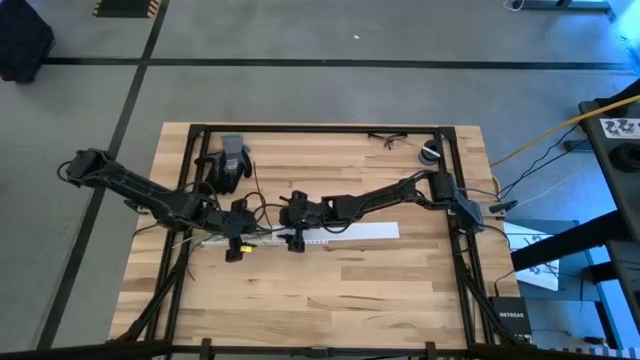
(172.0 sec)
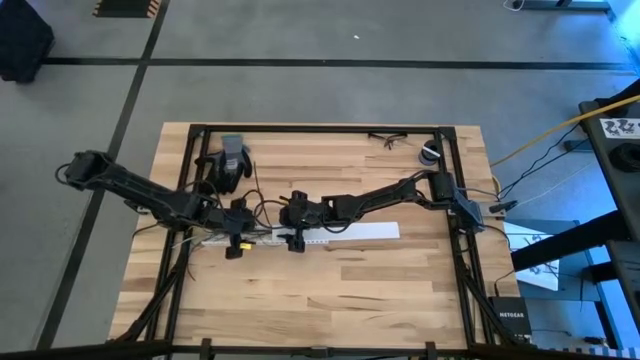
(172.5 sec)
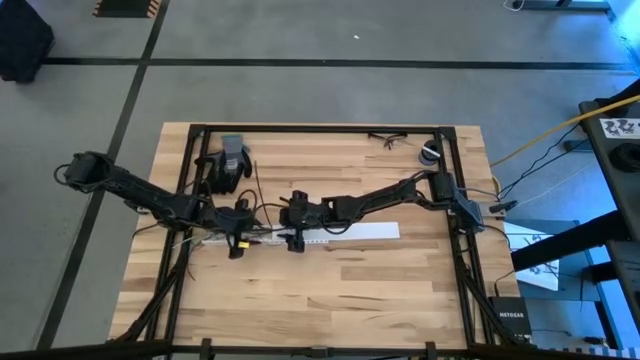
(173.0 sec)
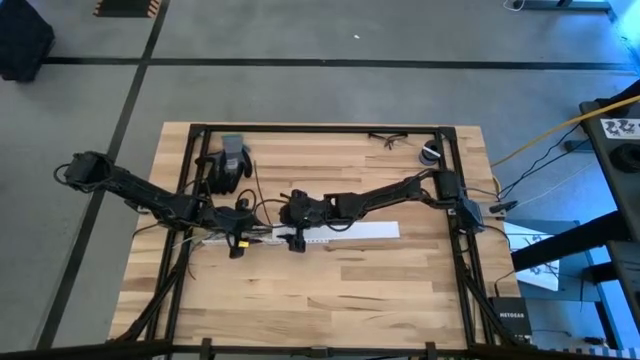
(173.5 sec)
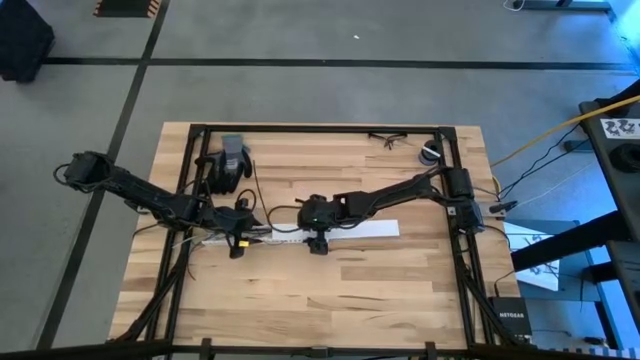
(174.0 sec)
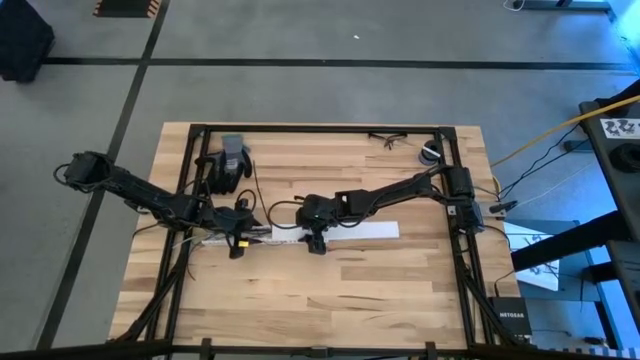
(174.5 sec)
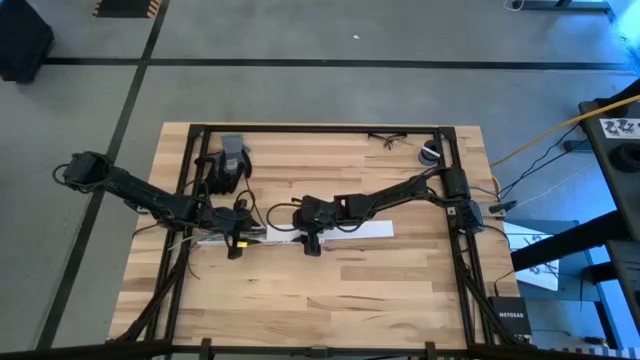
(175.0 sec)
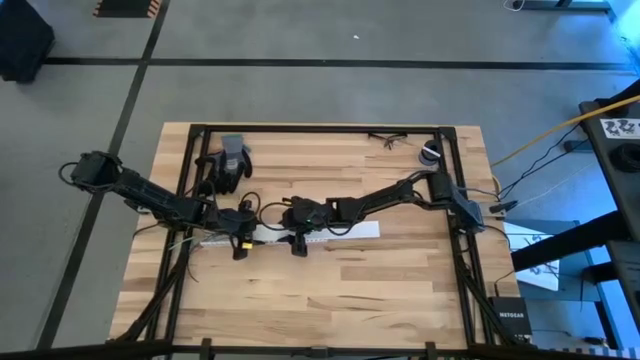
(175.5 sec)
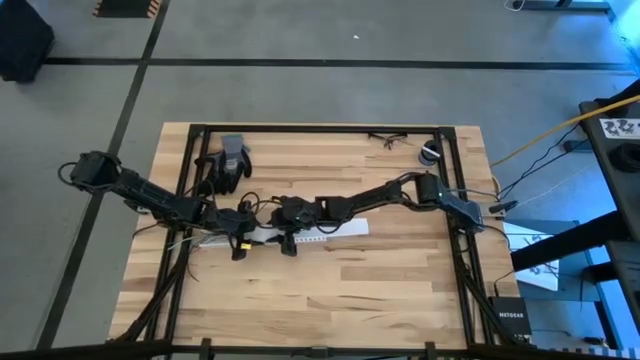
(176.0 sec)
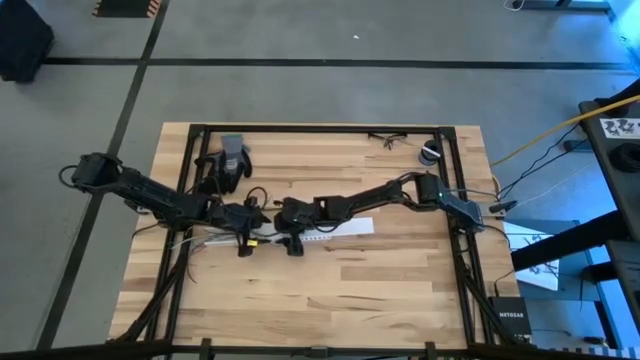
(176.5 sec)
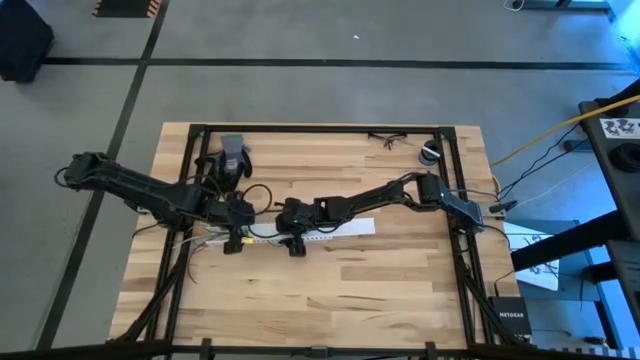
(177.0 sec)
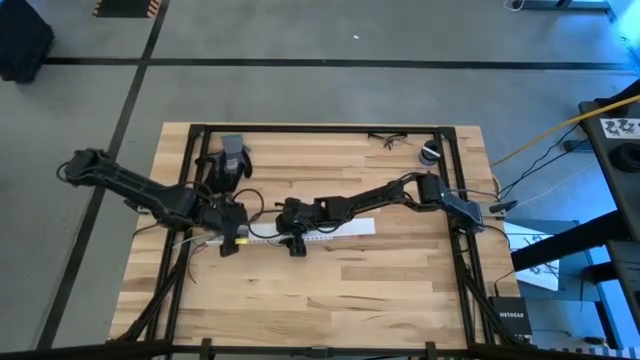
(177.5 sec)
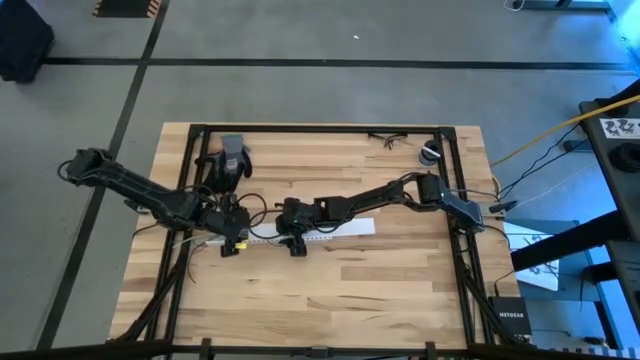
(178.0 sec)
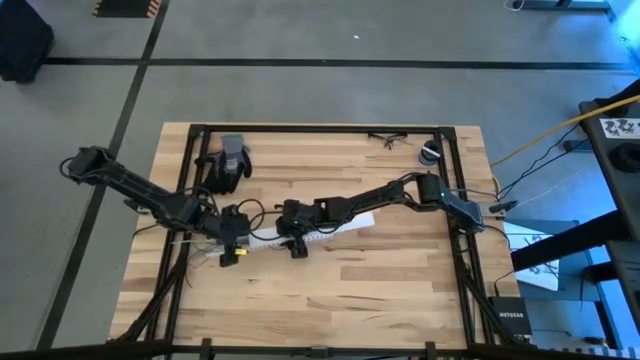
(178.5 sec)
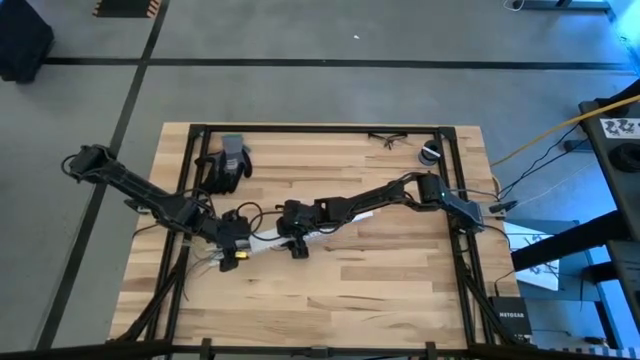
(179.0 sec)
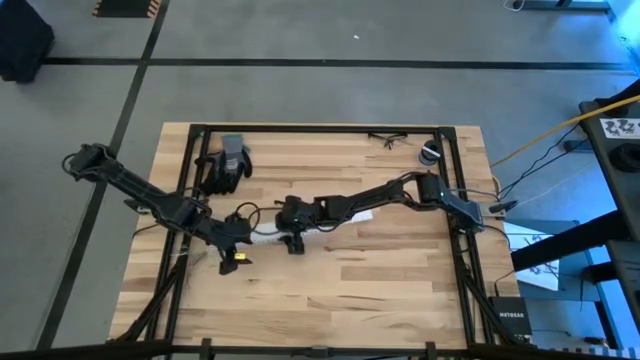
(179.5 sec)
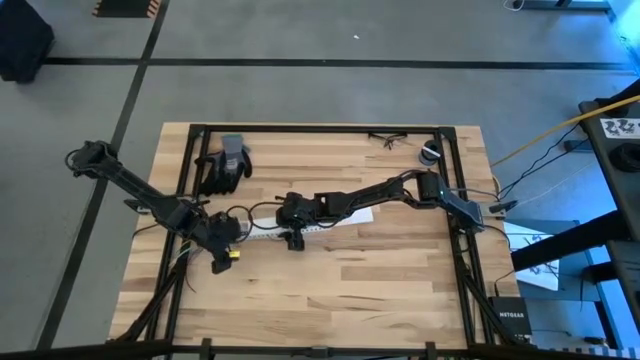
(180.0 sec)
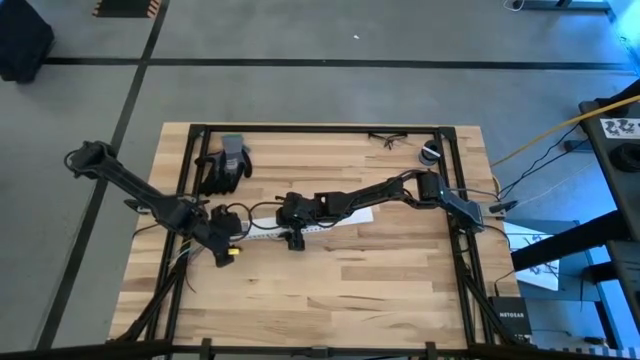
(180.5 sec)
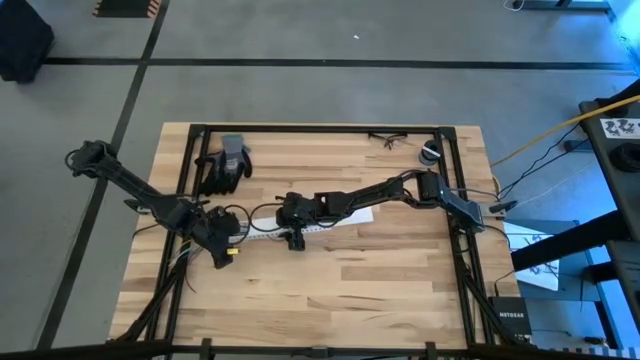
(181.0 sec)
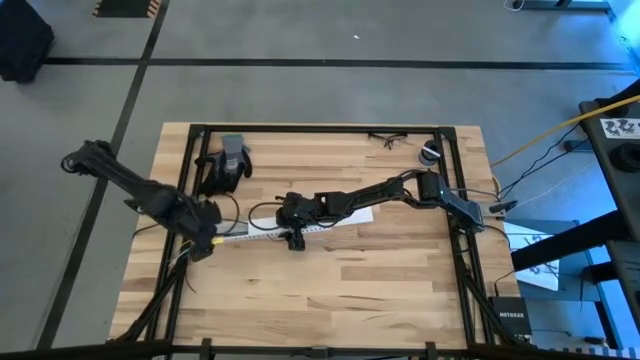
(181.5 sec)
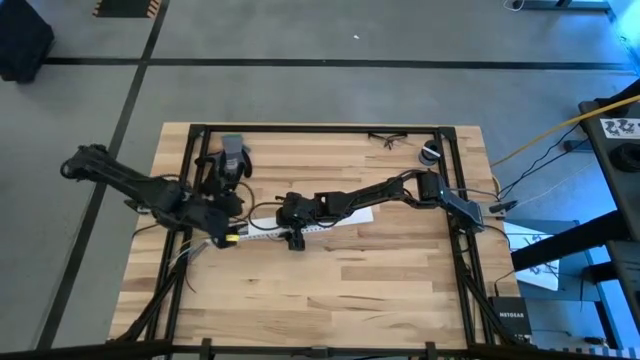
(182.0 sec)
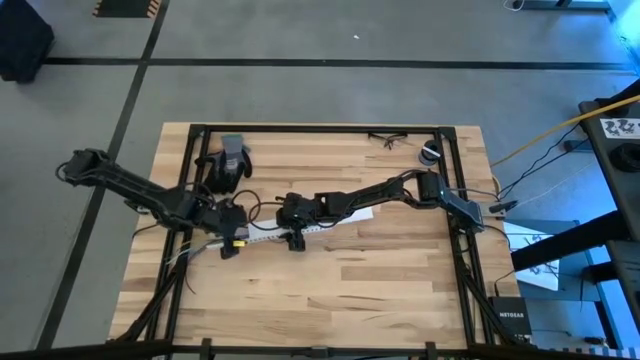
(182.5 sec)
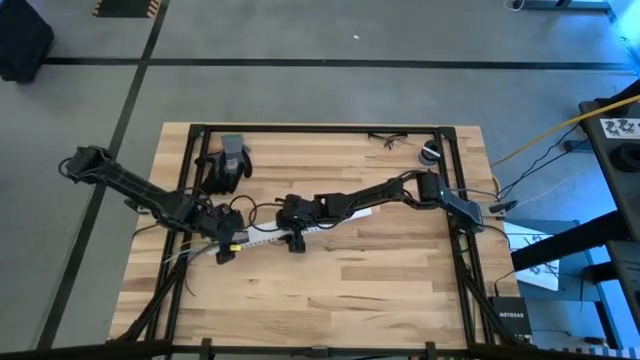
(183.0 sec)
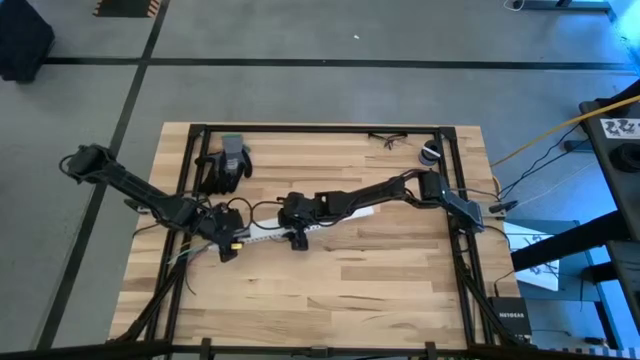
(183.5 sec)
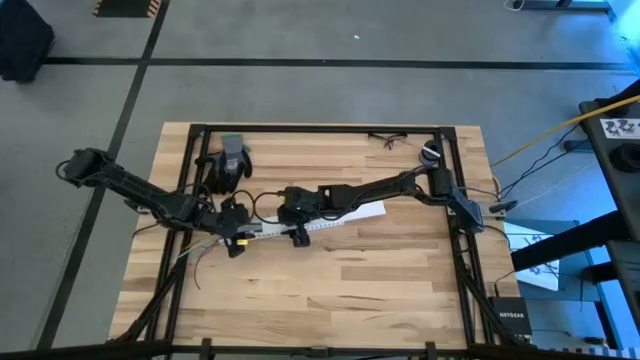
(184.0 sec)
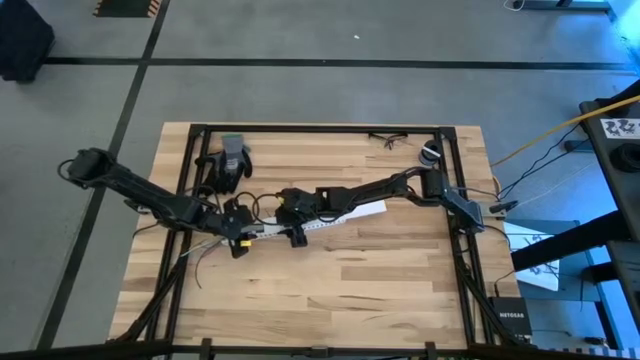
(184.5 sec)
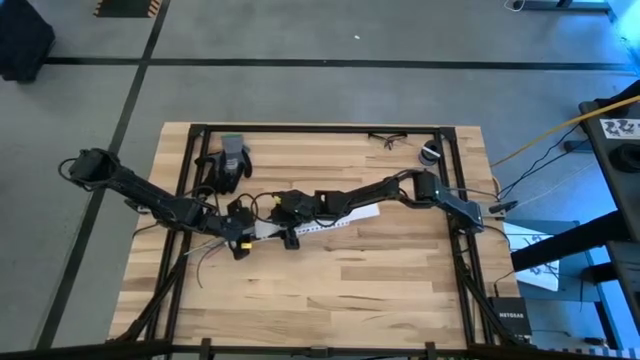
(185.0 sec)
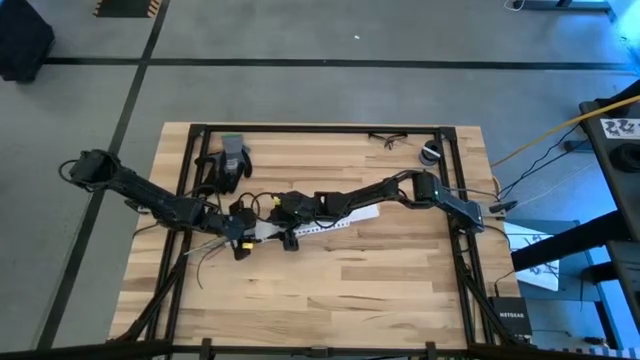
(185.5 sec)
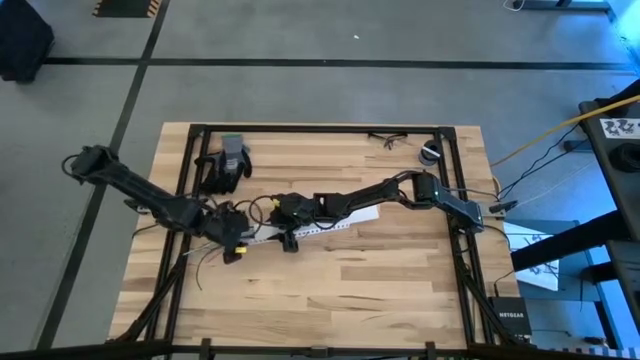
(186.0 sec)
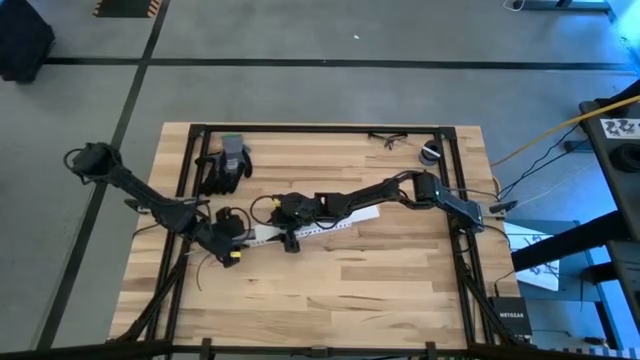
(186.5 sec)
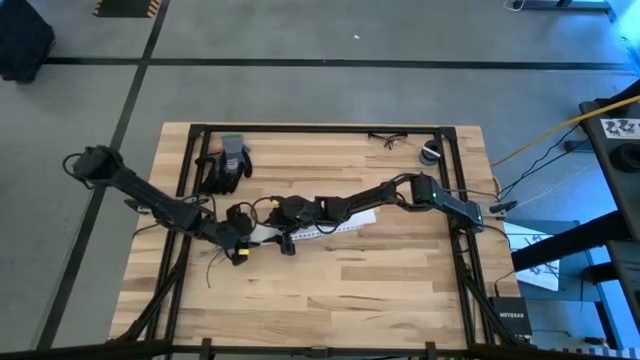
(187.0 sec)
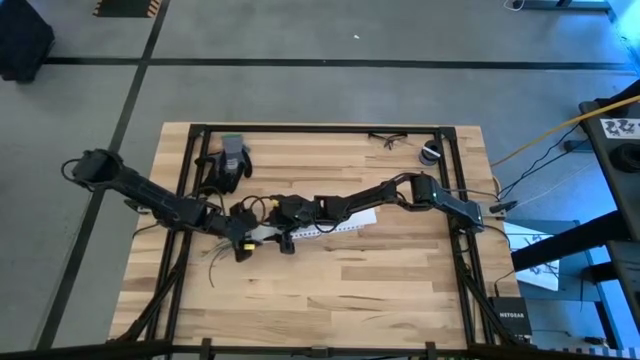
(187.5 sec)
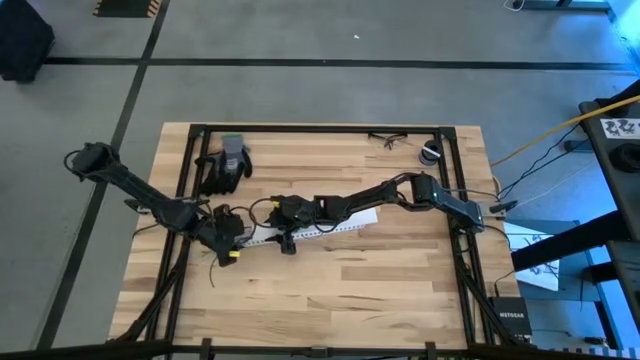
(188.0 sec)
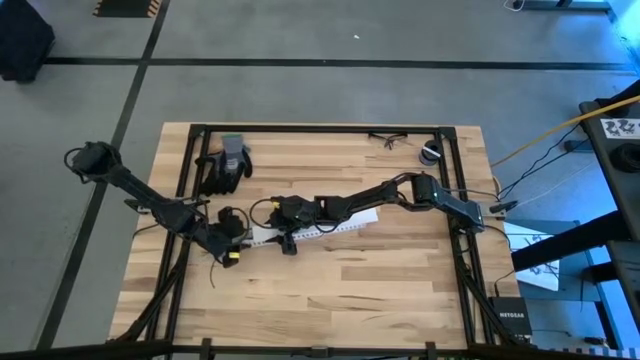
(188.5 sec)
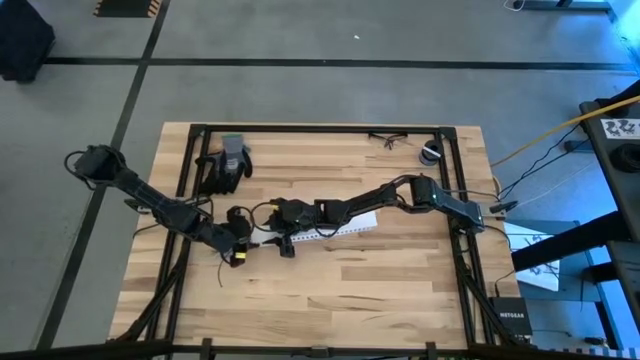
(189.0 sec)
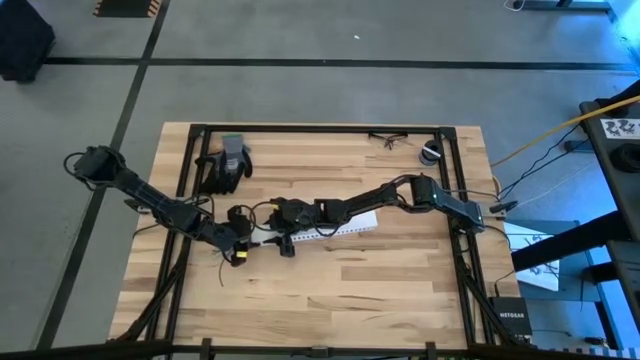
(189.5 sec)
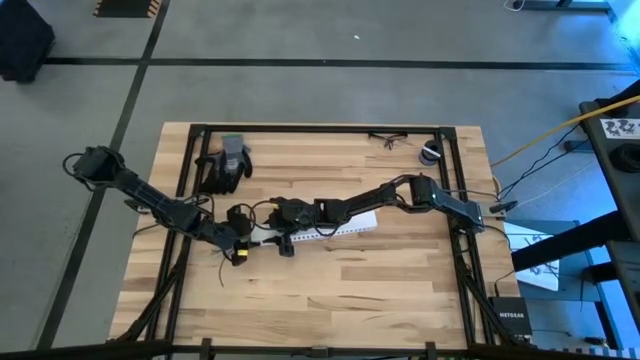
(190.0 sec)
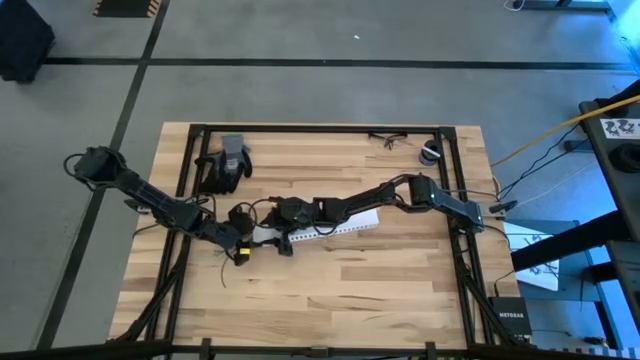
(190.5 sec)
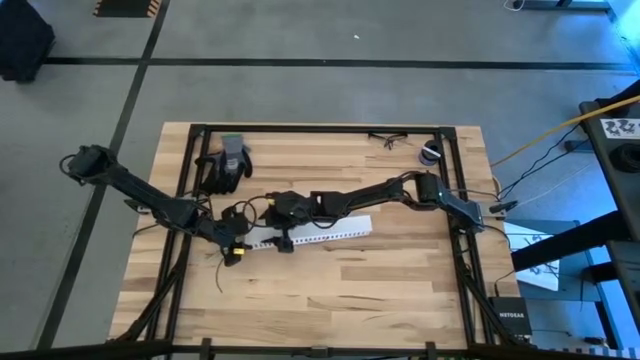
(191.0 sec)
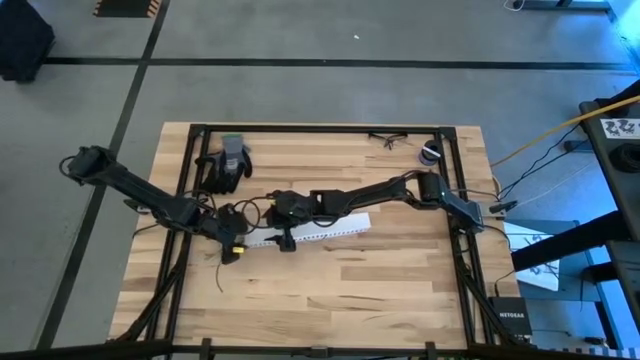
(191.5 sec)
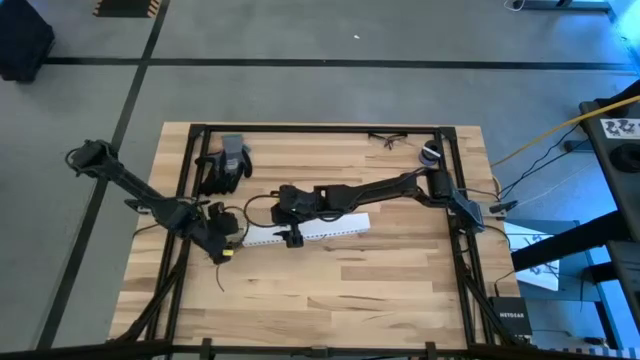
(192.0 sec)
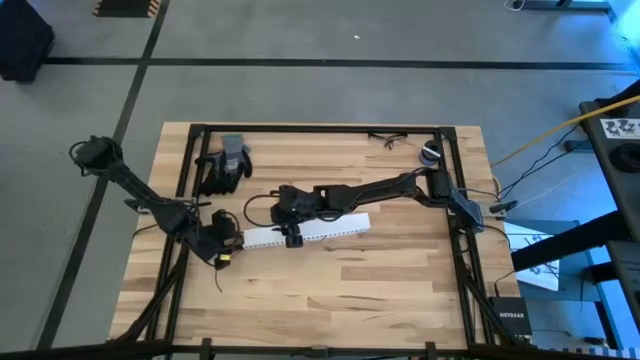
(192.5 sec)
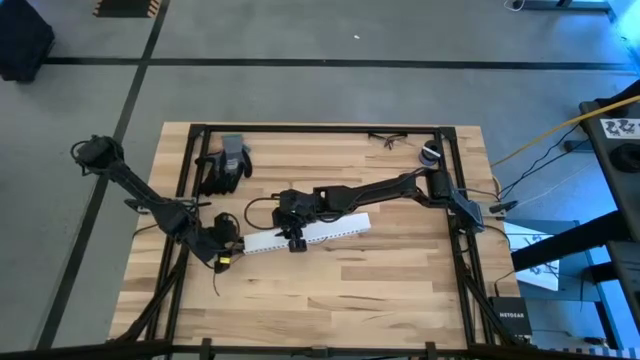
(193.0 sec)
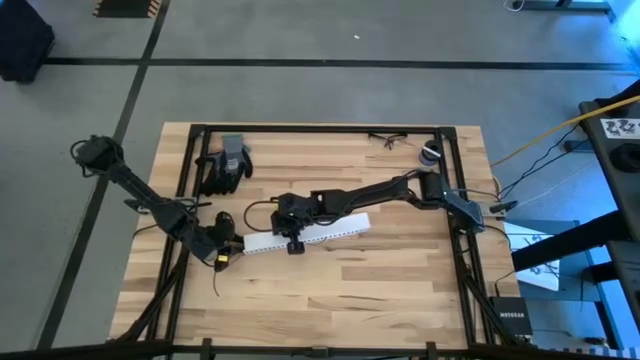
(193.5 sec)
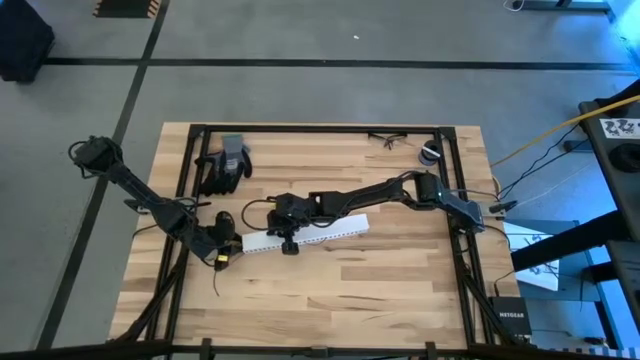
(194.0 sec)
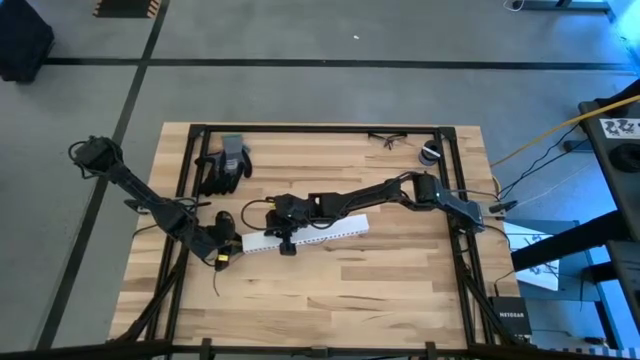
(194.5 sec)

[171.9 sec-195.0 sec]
Task: Ziptie cables
Close the white cable duct with the lid
